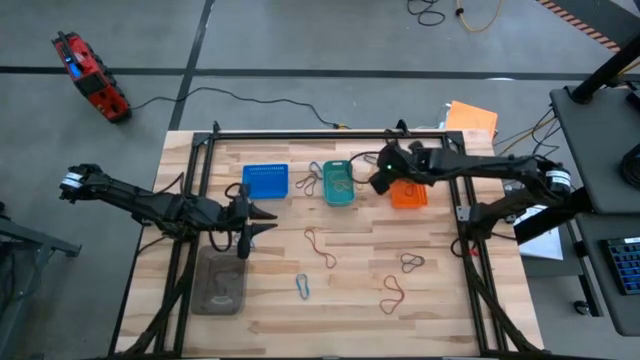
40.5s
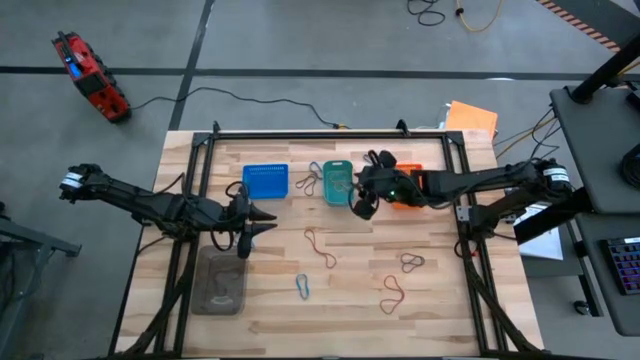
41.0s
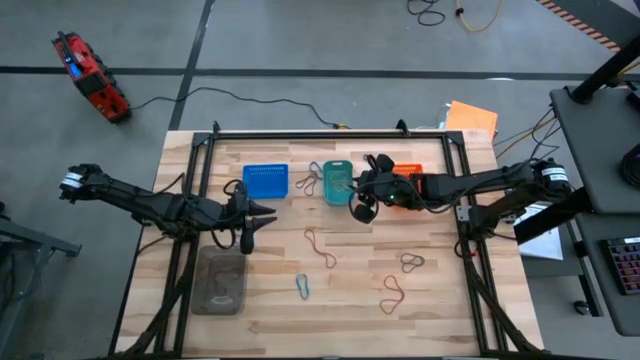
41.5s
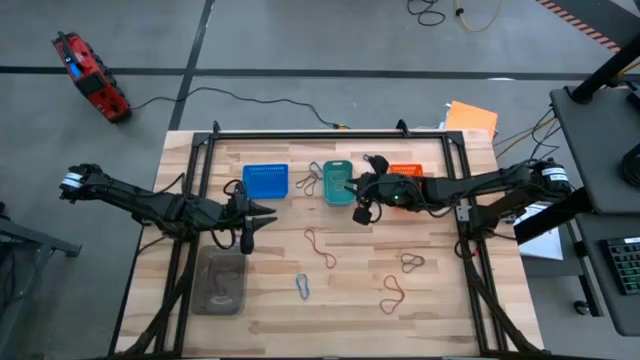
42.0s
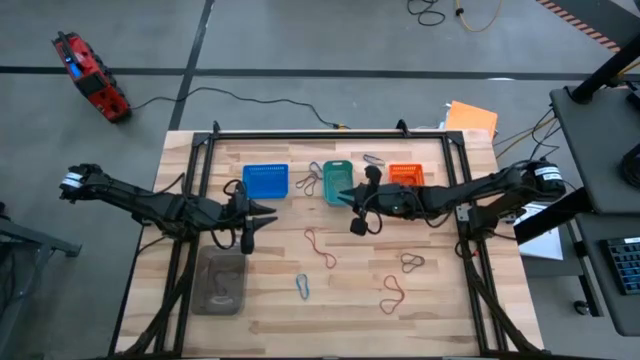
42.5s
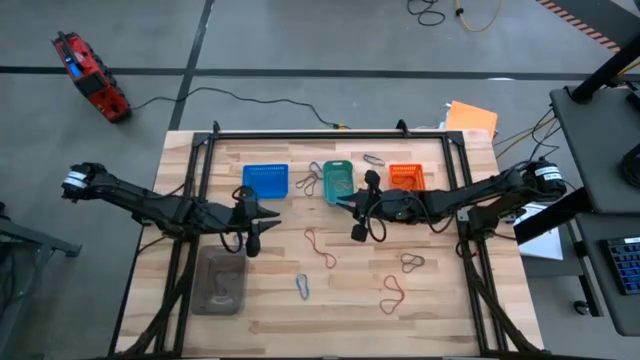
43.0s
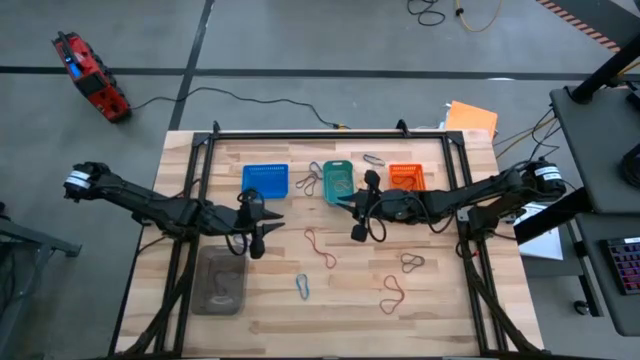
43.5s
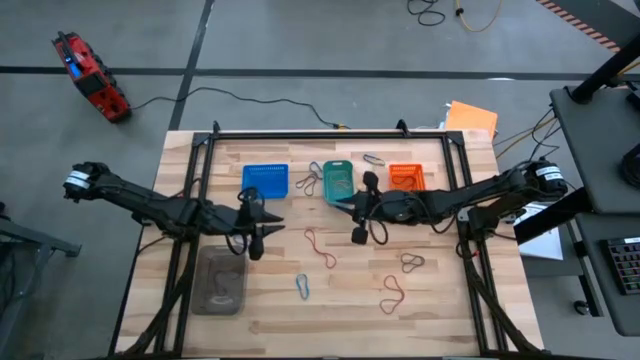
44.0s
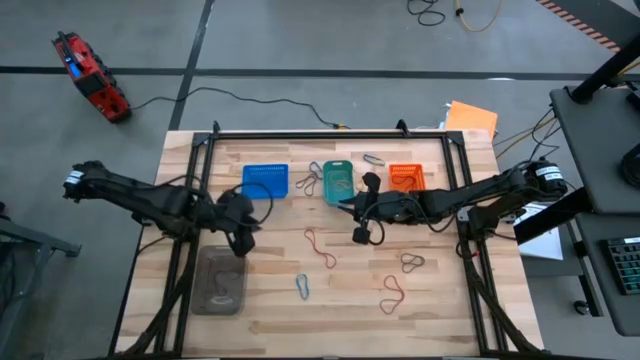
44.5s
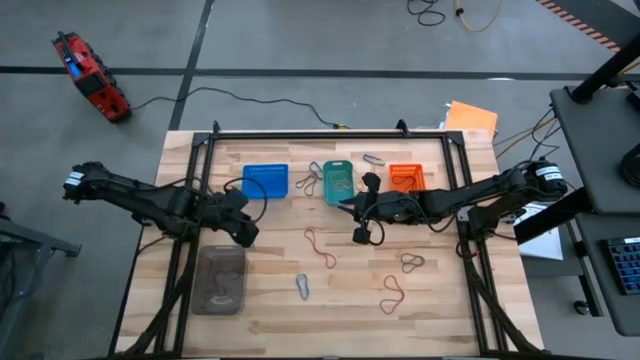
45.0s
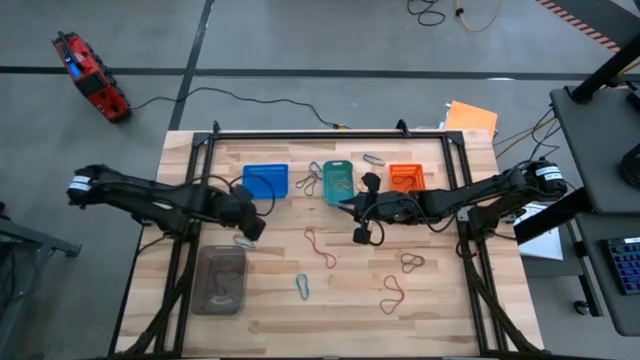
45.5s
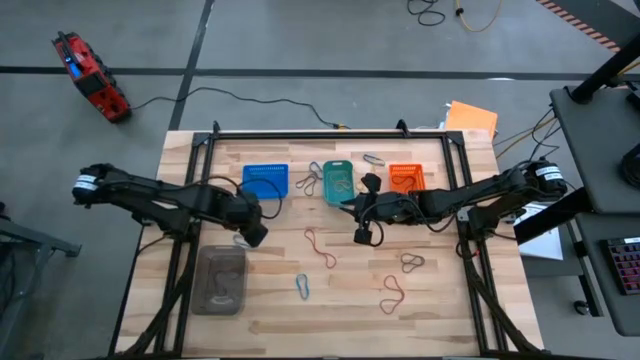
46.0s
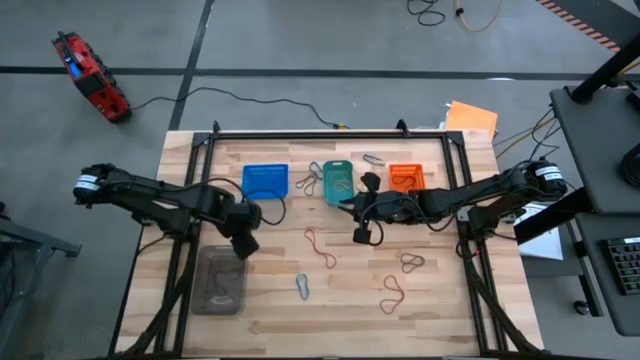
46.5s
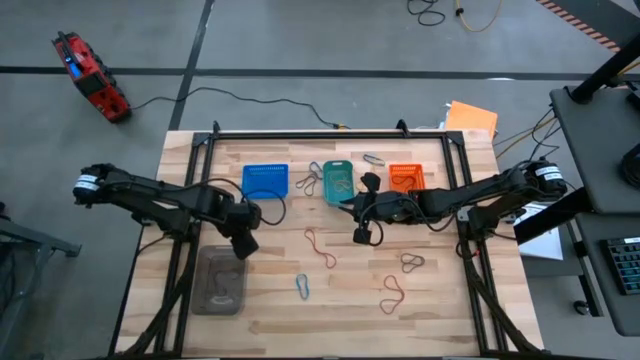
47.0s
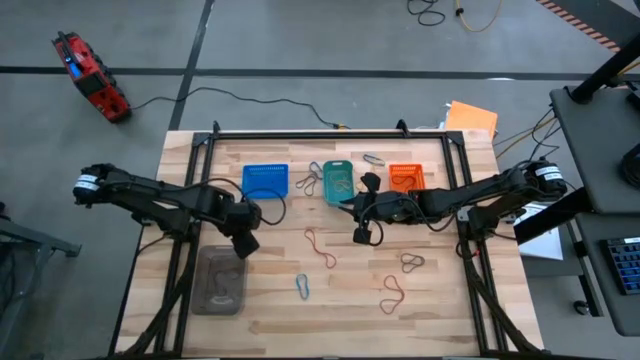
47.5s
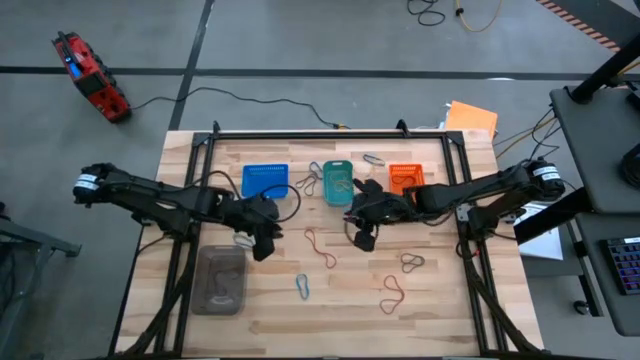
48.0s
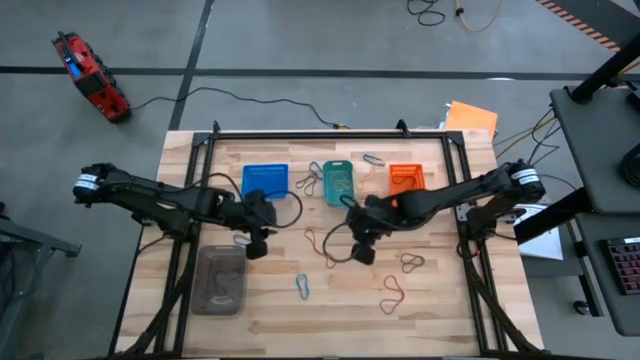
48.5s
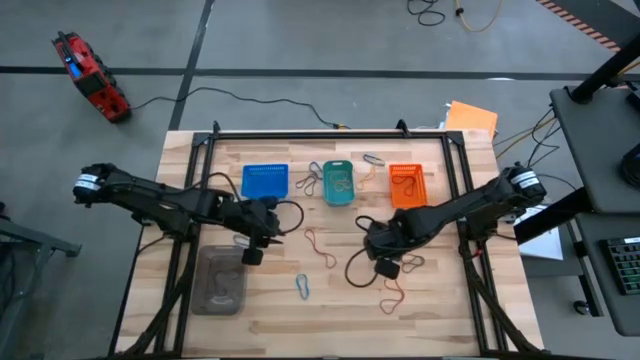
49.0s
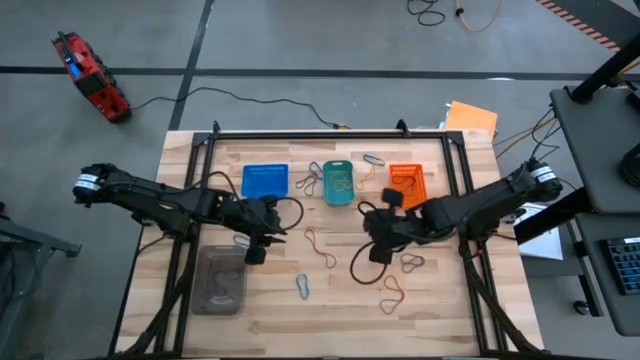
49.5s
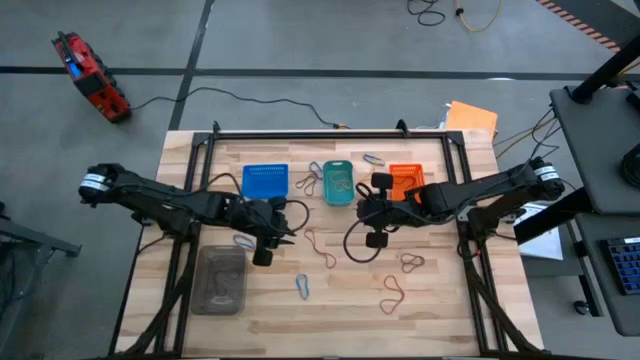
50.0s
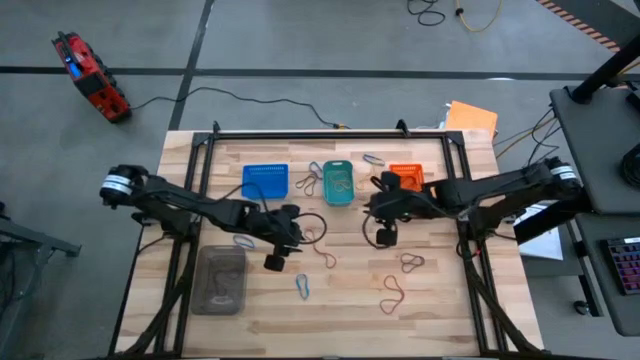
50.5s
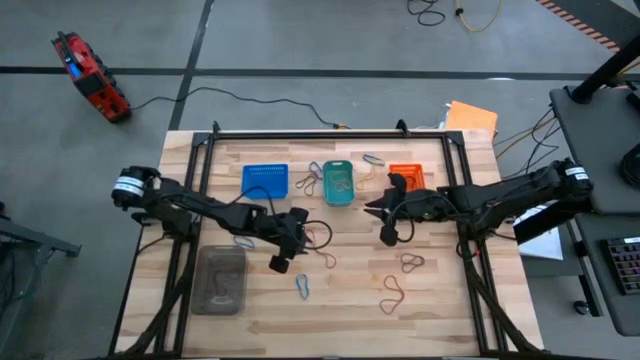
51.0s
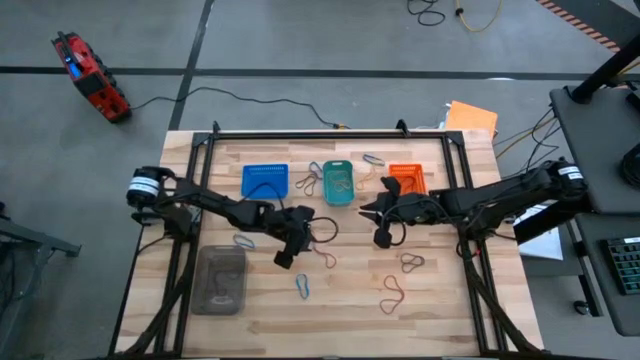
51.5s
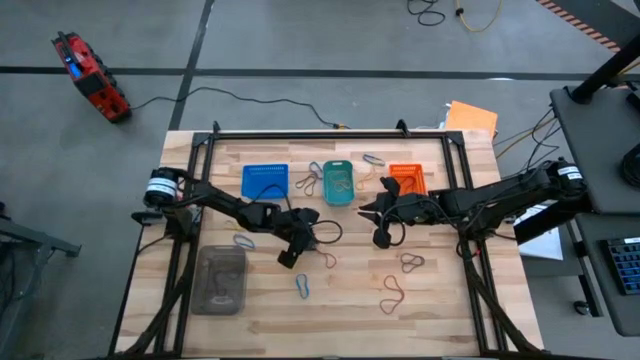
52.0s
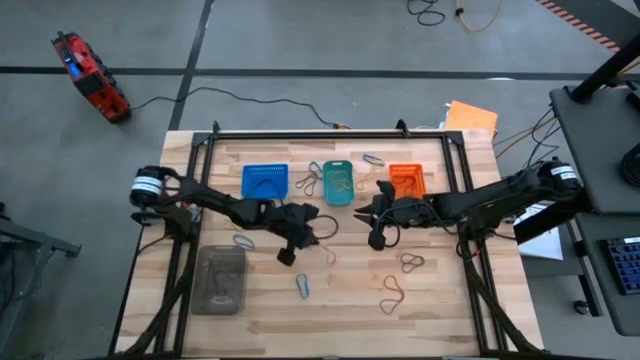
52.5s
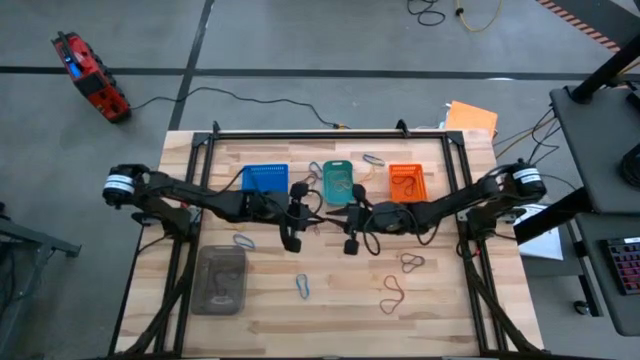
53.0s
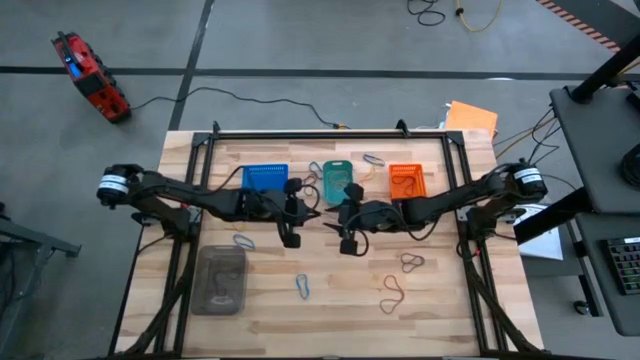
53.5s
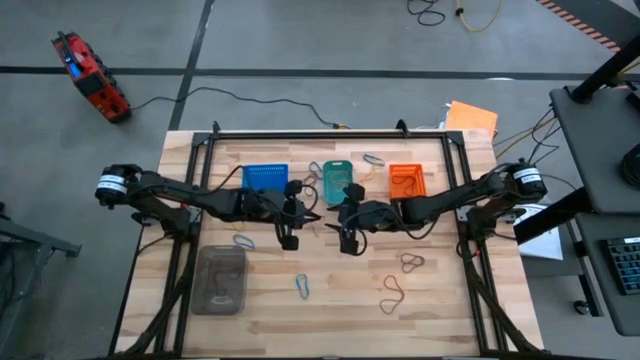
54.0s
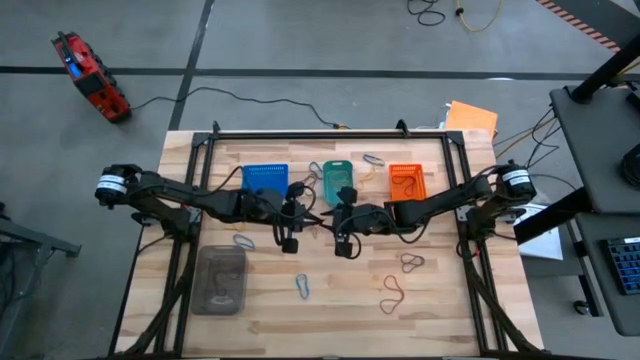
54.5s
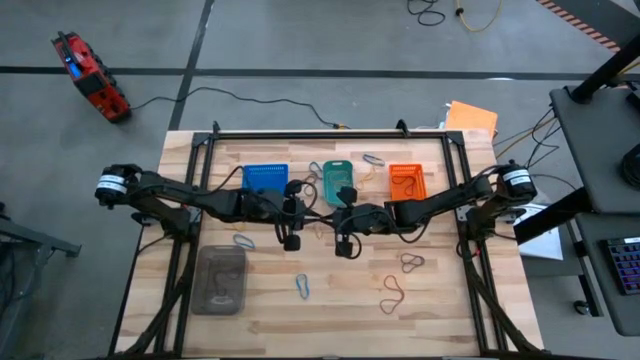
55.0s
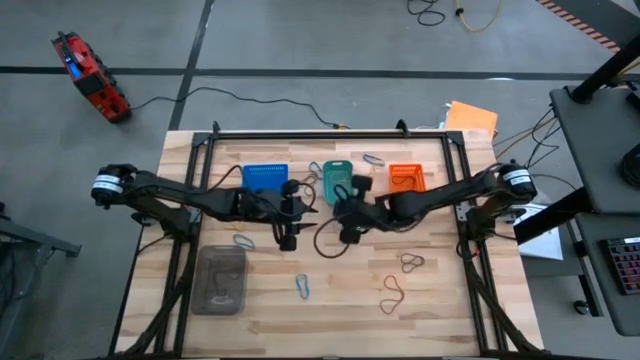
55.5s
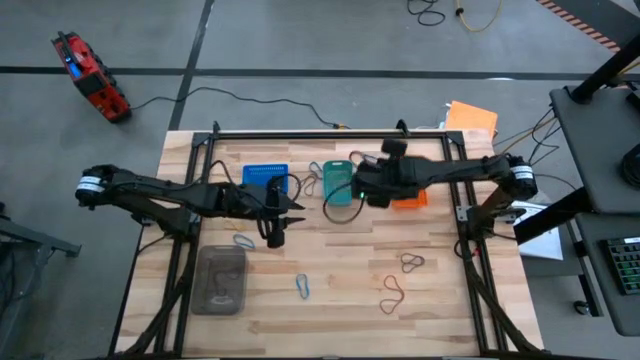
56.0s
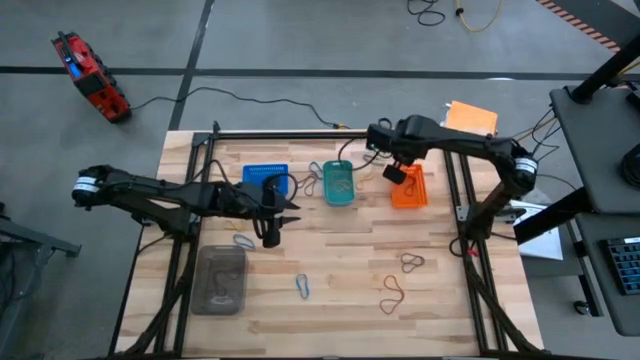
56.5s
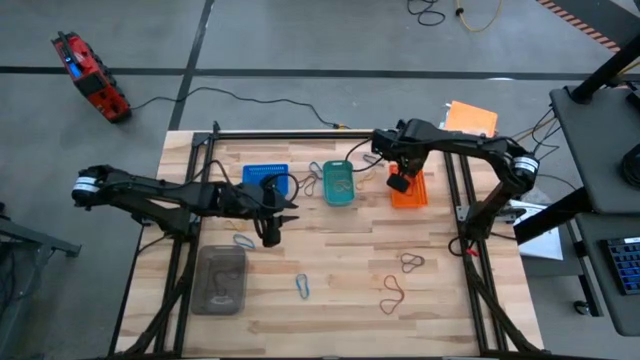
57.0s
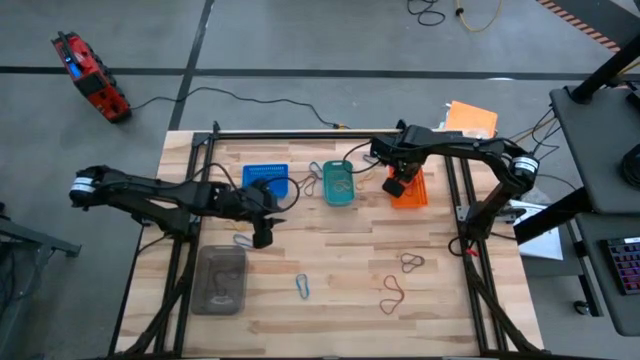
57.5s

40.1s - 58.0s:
Task: Sort rubber bands into baskets
Put the left red rubber band into the orange bin

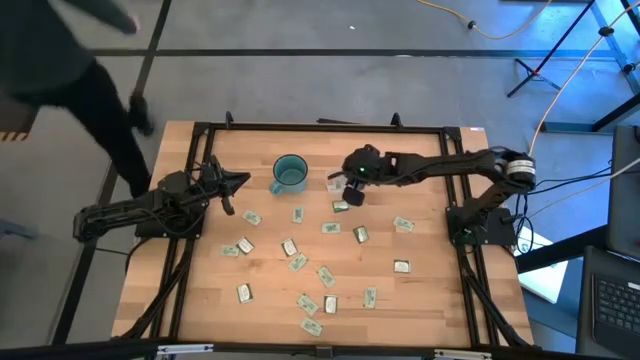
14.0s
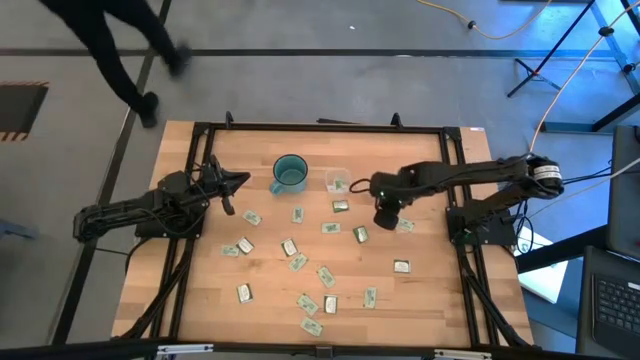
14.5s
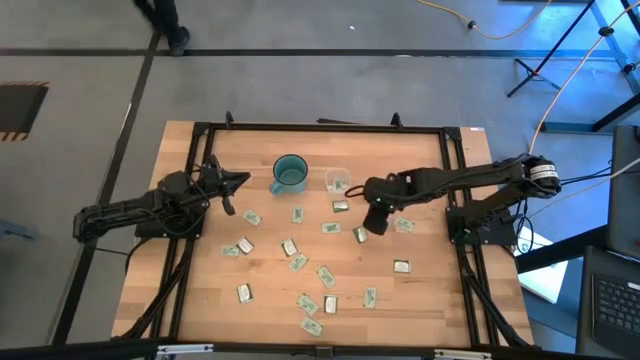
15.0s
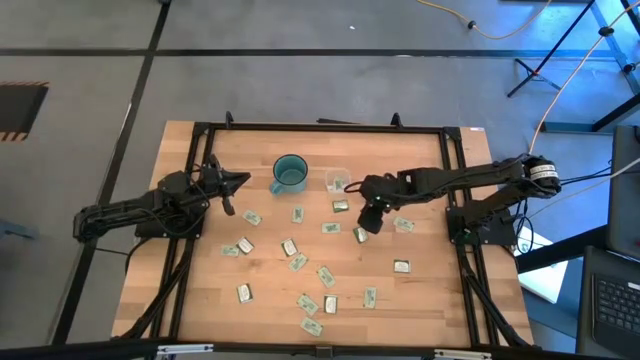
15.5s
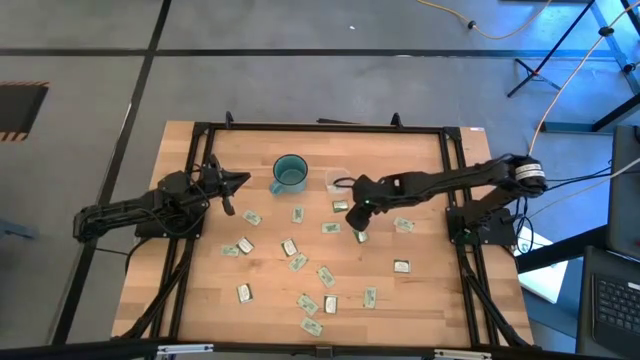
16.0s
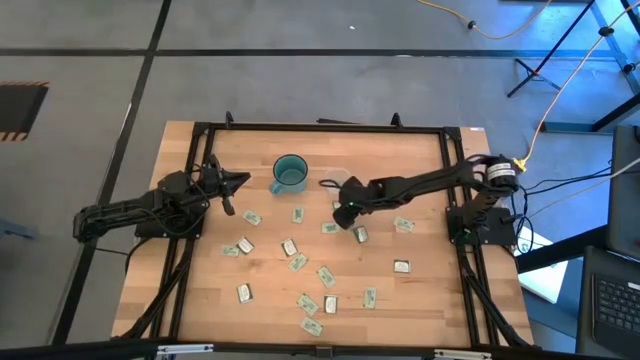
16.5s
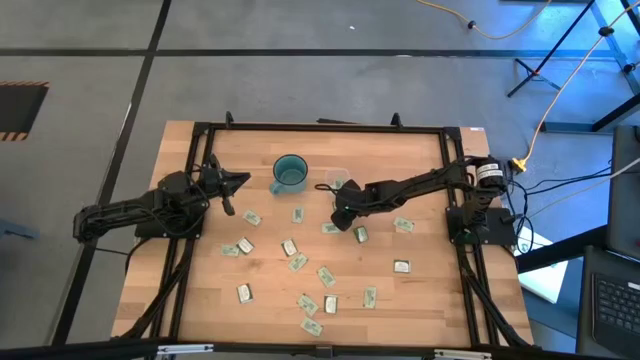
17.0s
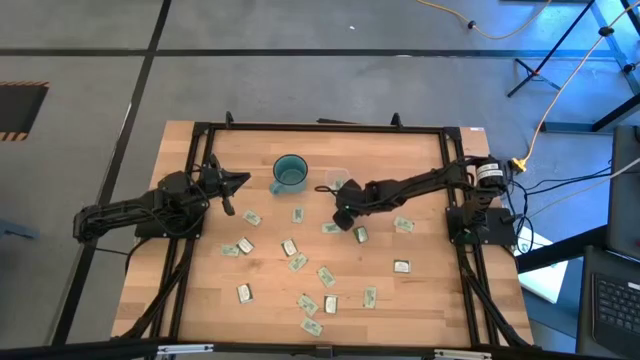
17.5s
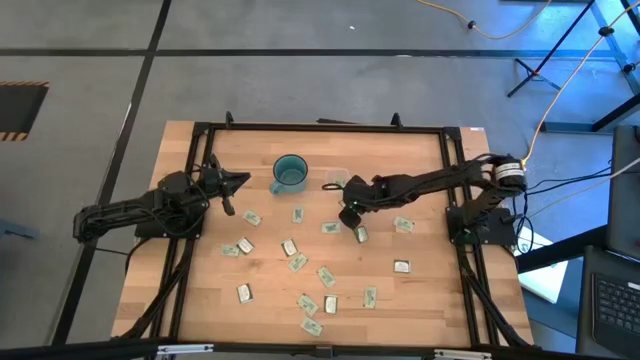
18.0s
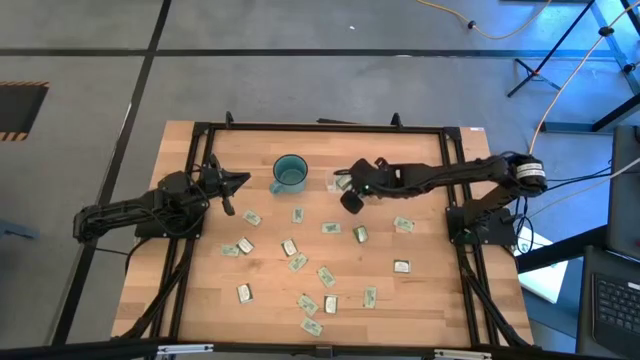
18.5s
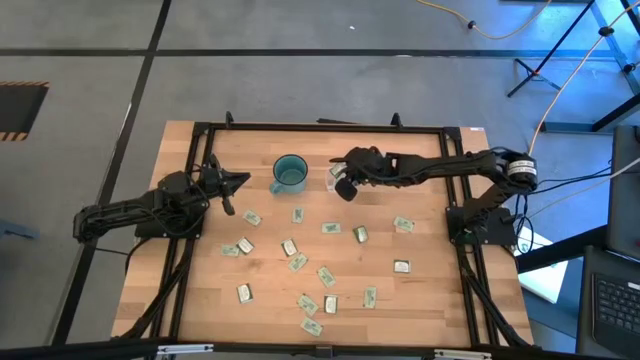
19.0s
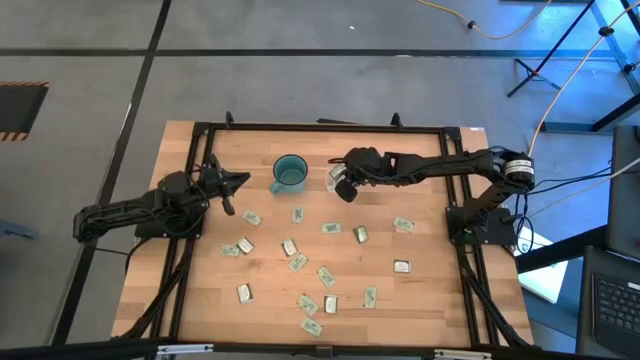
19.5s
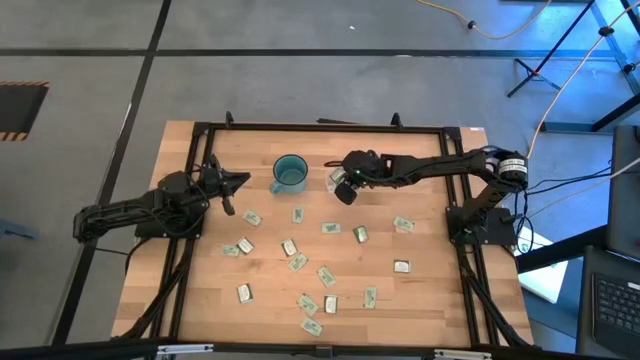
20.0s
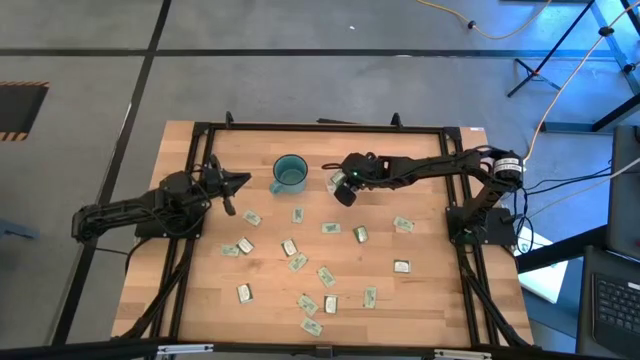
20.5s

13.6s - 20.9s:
Task: Pick and place items into bin
Put the green stevia packet into the transparent bin
